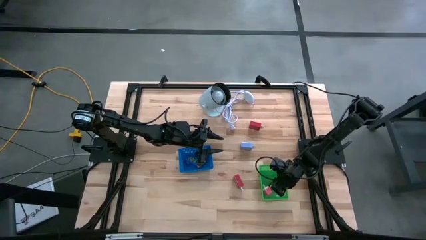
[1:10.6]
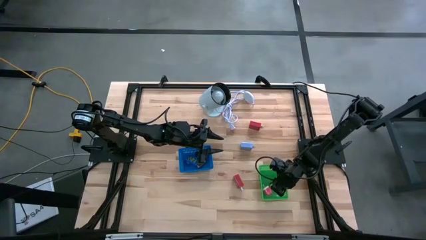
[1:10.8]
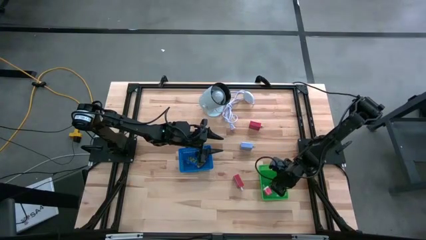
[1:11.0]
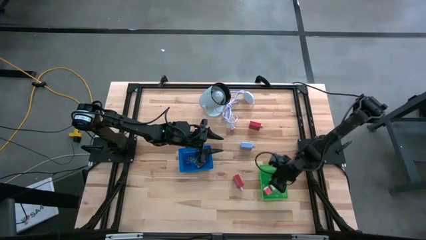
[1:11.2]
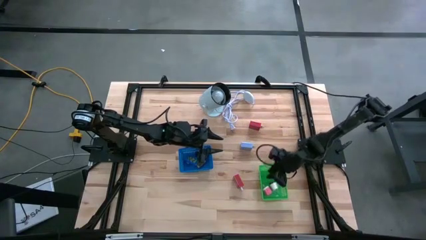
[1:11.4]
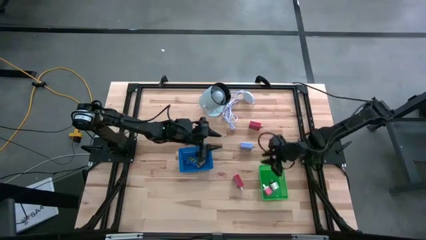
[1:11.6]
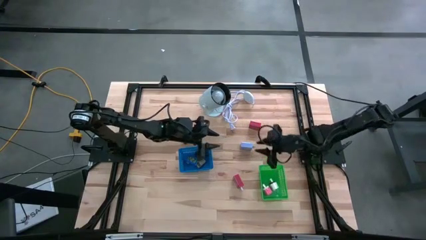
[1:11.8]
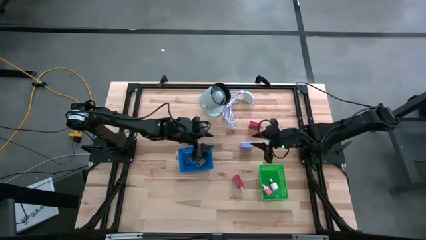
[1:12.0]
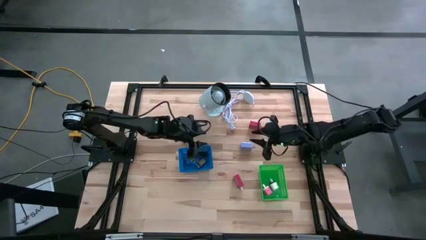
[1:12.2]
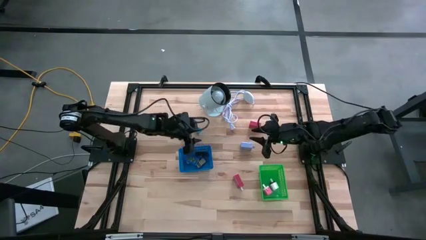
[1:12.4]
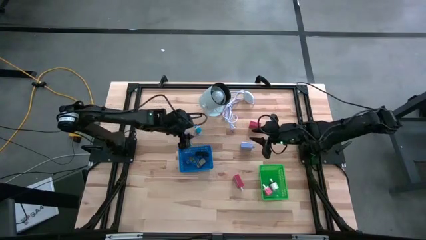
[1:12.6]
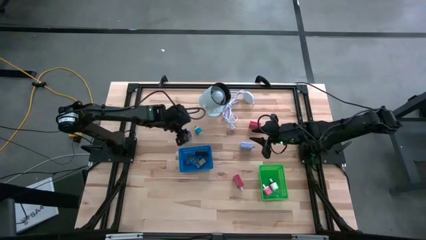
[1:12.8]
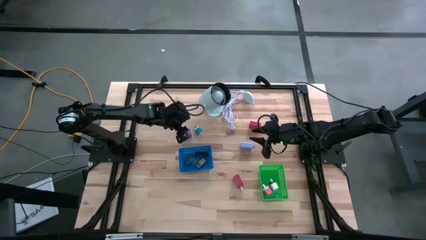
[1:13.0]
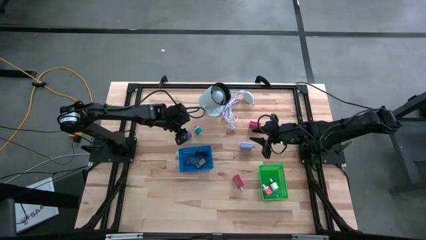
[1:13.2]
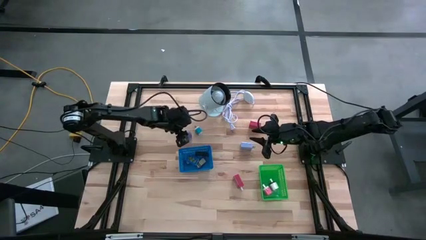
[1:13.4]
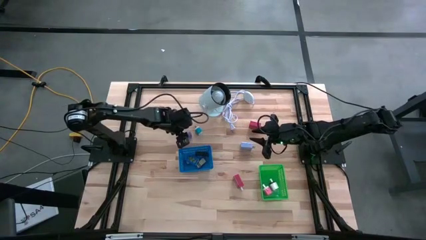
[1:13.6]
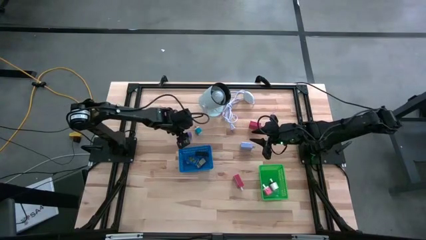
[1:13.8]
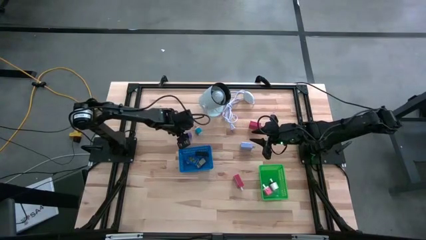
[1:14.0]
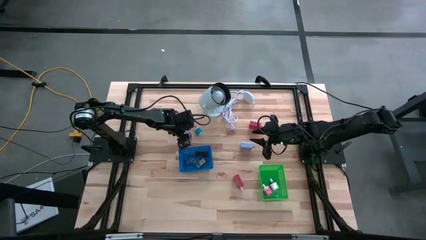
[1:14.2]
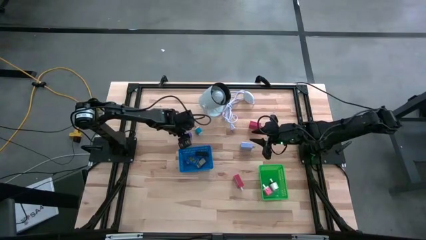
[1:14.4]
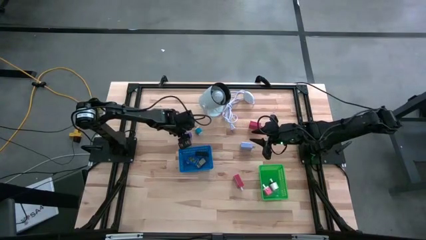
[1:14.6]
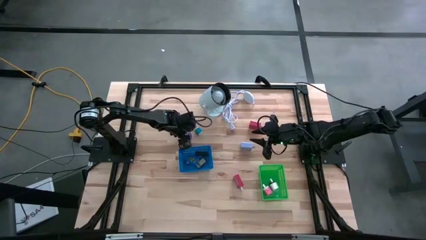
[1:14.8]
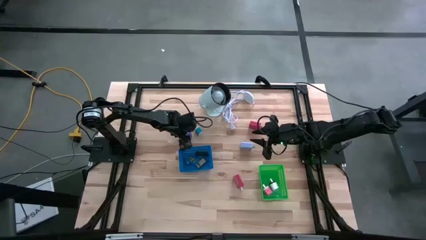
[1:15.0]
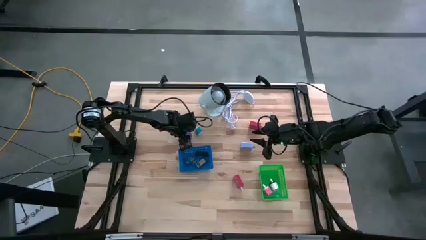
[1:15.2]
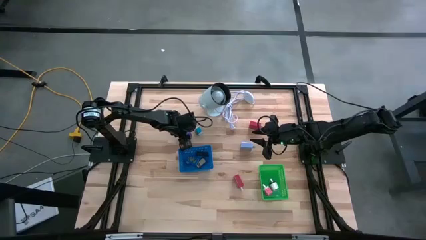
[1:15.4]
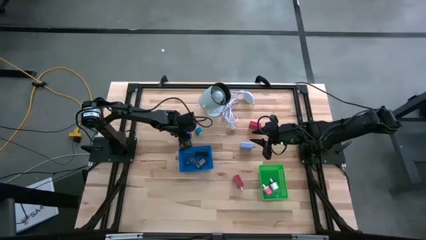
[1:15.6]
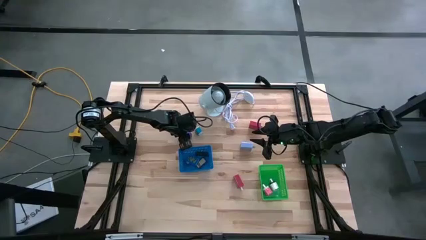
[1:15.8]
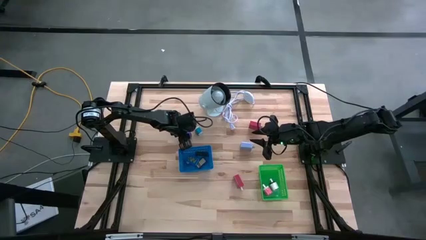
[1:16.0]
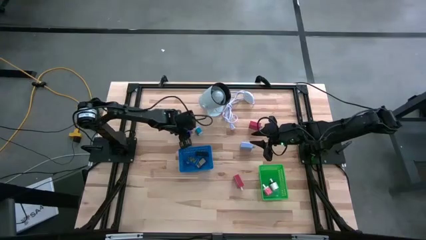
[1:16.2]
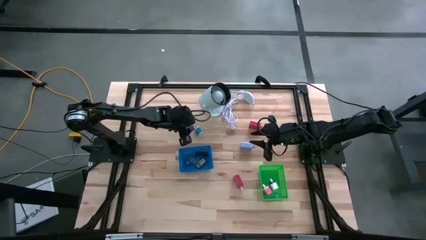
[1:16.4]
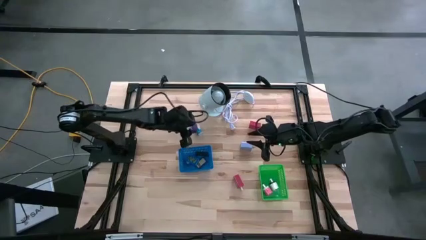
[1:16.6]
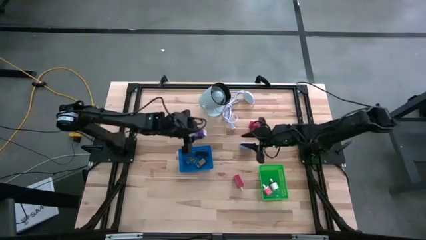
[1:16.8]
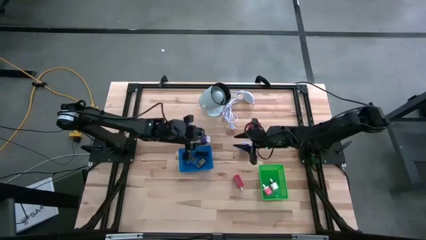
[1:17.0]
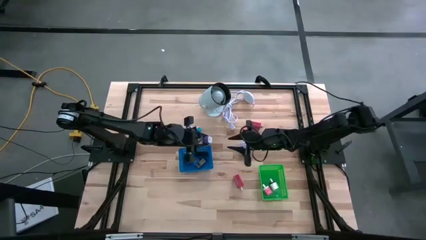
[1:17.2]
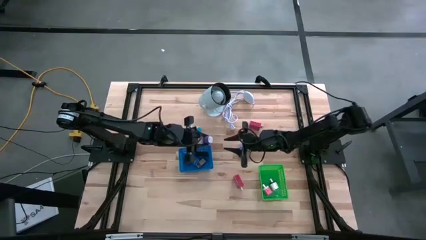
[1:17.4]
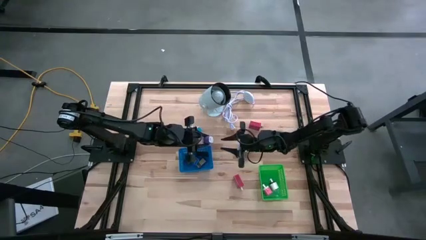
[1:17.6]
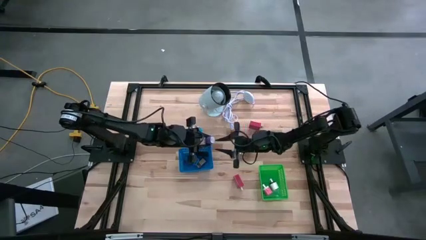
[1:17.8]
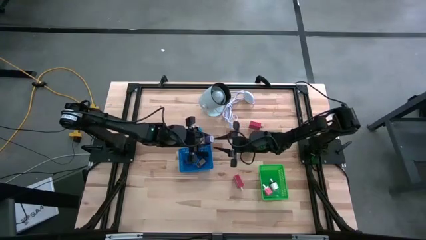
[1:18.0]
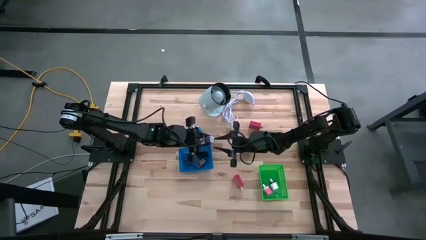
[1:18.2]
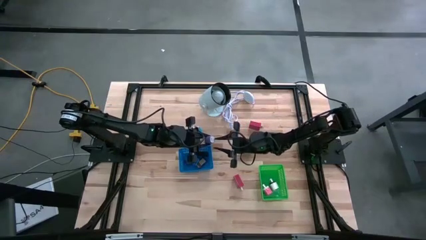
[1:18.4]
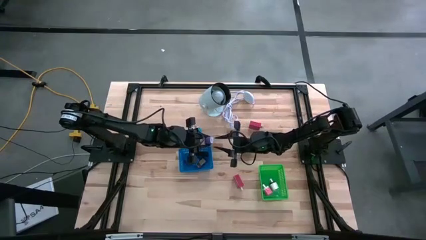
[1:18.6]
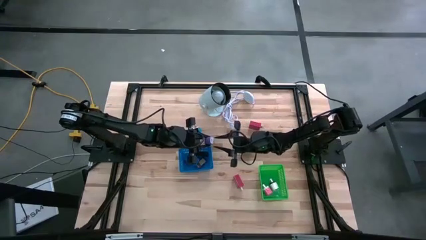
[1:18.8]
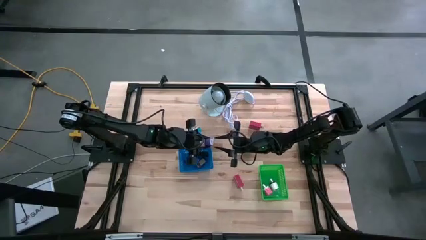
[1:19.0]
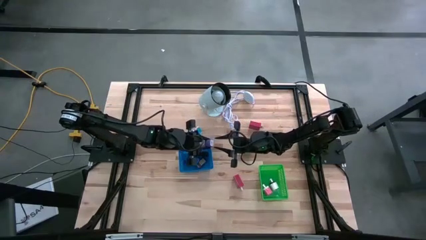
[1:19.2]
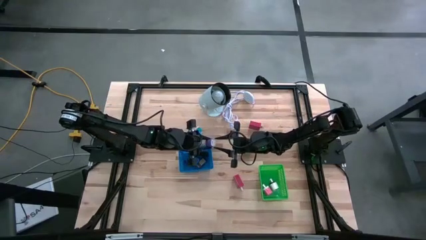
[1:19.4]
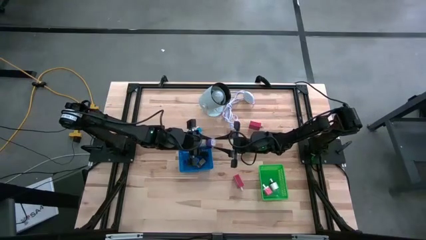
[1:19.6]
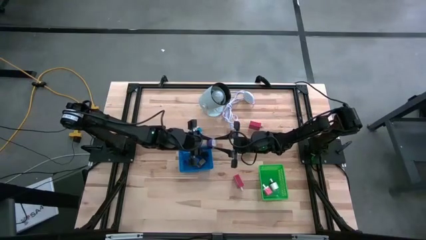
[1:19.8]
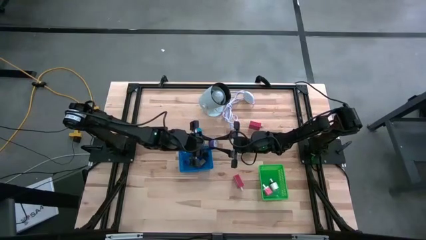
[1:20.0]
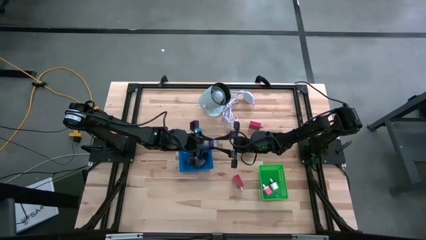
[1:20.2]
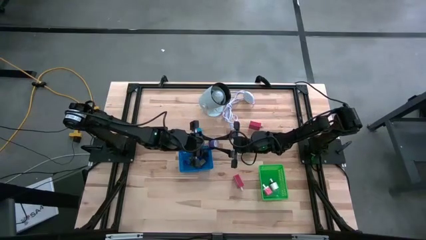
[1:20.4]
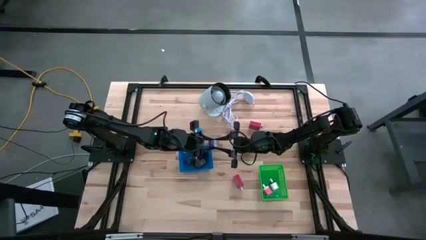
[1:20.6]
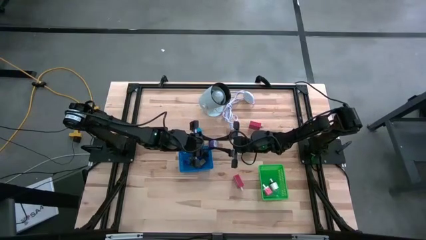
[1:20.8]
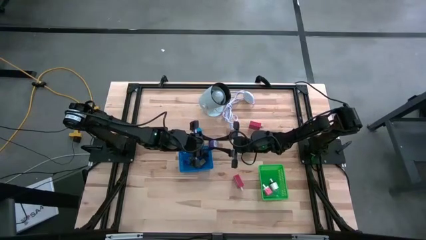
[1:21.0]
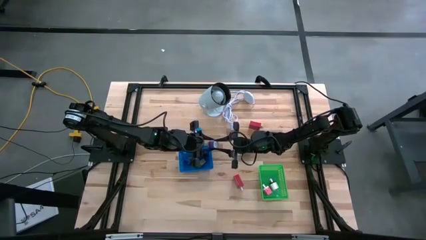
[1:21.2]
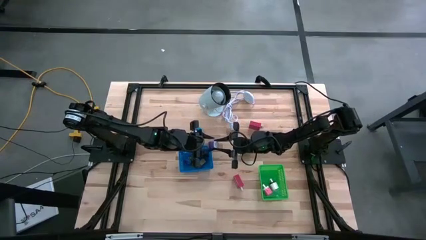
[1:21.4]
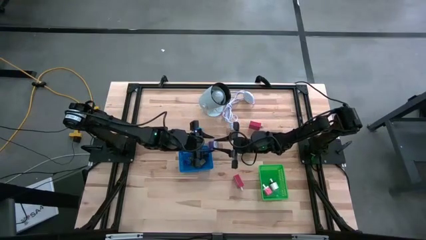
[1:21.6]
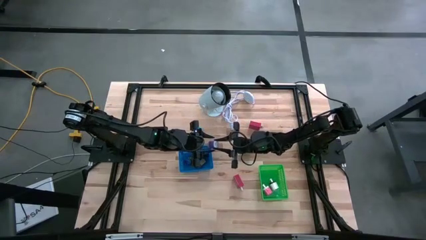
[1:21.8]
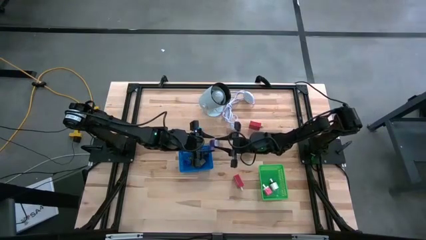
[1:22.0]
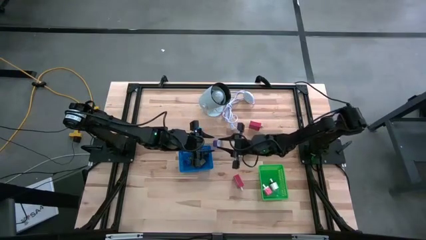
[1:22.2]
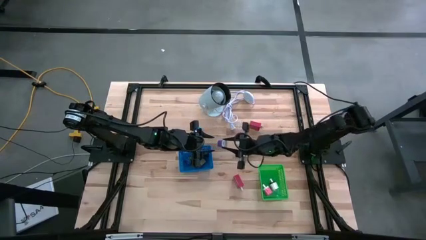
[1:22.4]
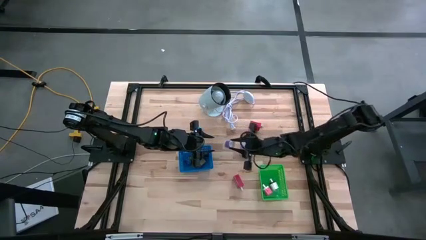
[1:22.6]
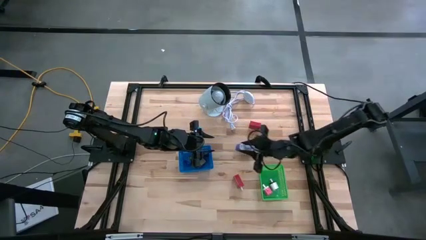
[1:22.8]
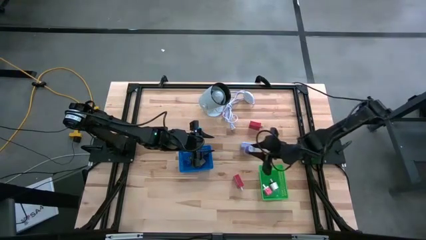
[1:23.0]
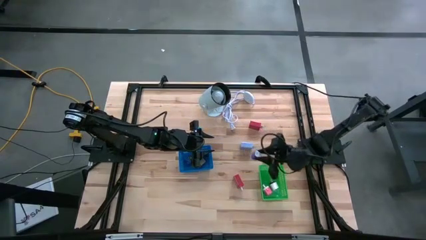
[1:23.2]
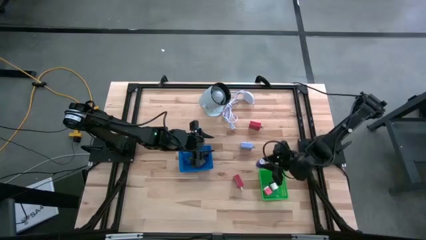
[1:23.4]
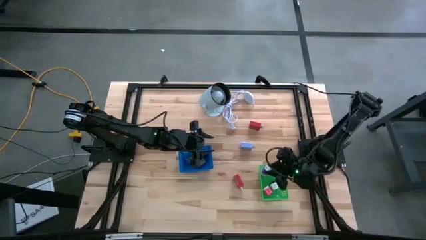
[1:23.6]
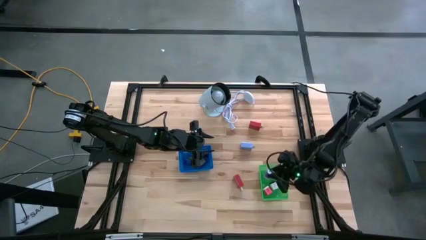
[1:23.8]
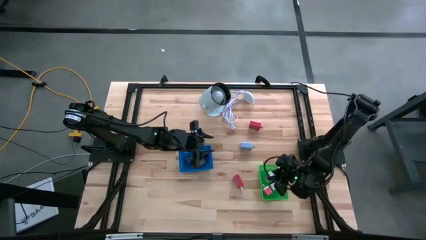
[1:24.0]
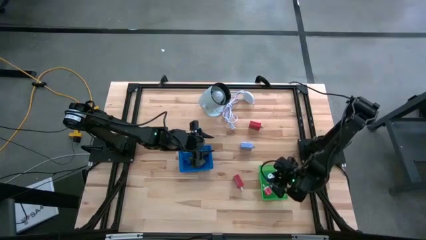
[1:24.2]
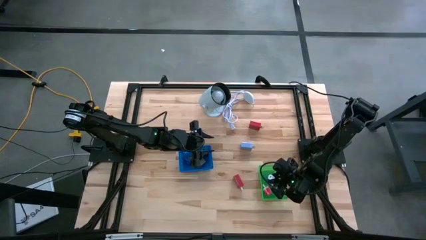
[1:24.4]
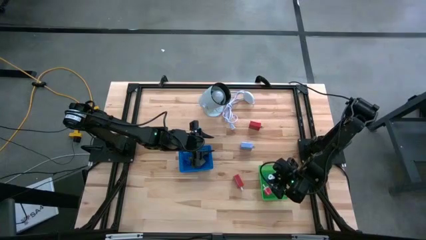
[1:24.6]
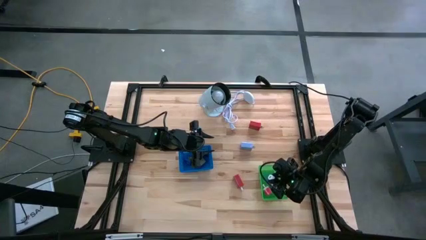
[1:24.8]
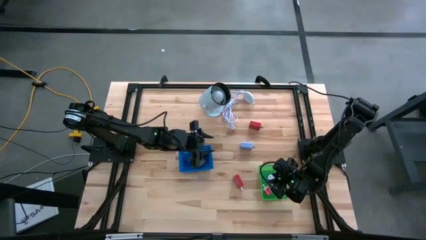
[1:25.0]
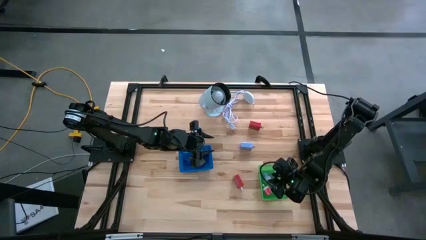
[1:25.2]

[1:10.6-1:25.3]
Task: Pick & Place Office items
Put the violet charger adapter into the green bin

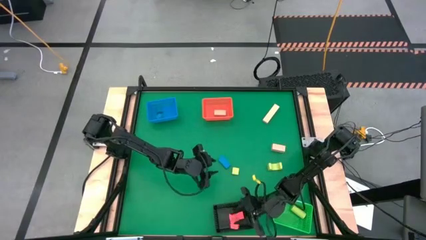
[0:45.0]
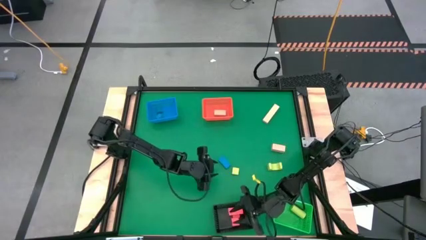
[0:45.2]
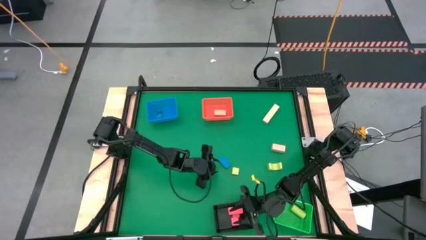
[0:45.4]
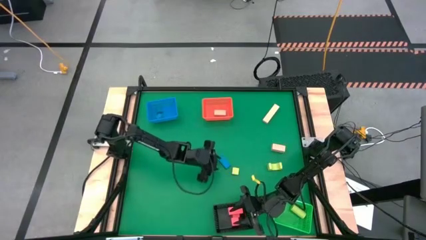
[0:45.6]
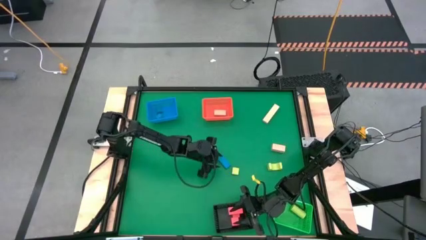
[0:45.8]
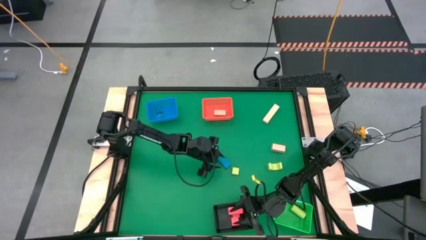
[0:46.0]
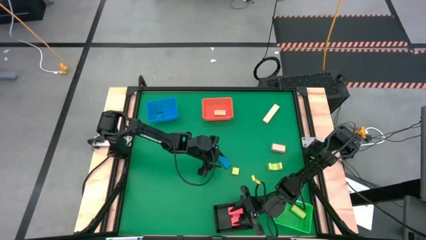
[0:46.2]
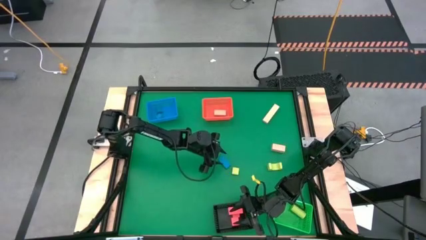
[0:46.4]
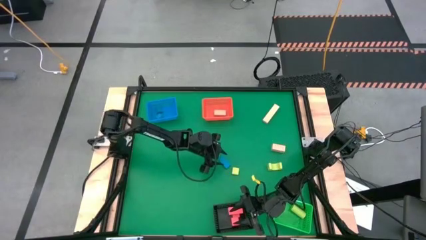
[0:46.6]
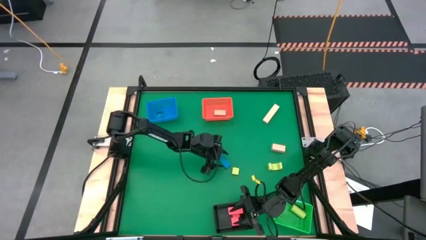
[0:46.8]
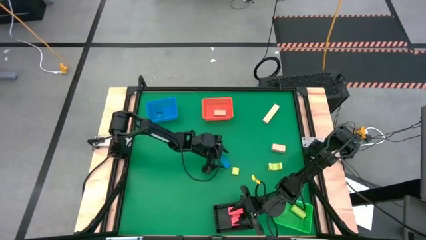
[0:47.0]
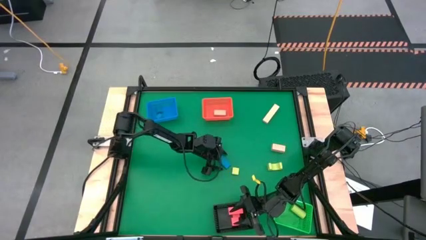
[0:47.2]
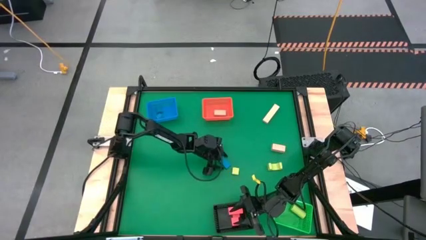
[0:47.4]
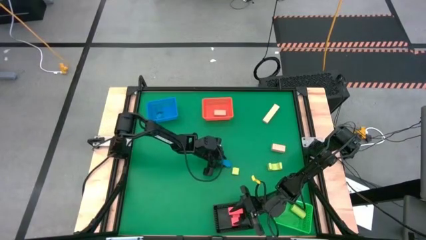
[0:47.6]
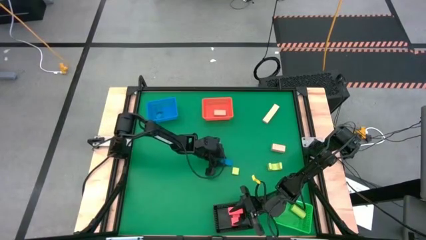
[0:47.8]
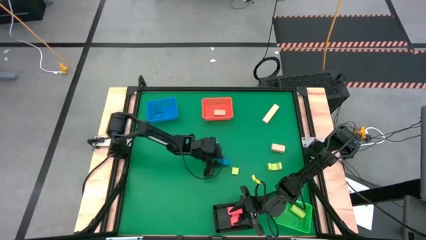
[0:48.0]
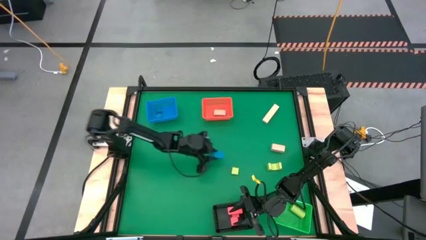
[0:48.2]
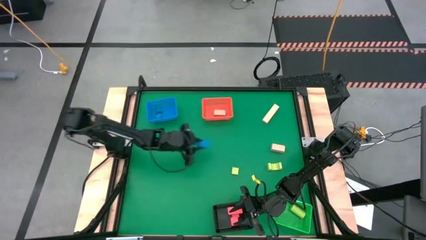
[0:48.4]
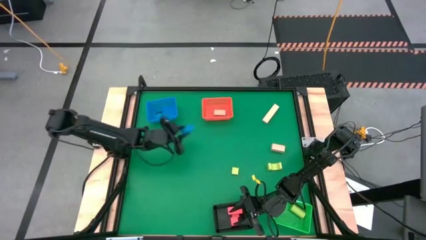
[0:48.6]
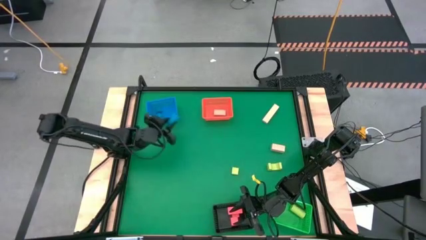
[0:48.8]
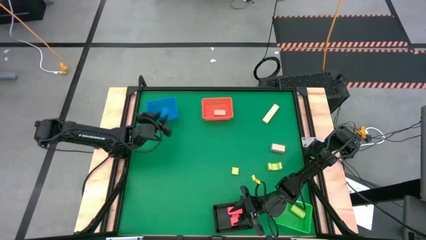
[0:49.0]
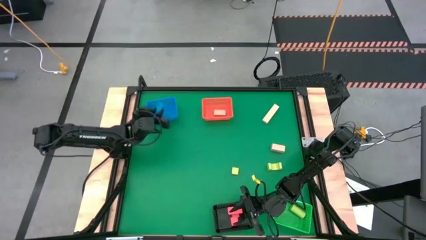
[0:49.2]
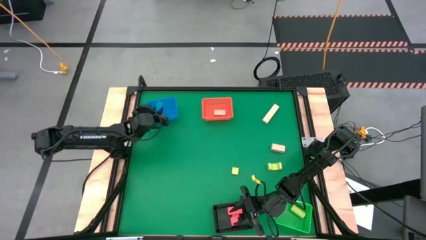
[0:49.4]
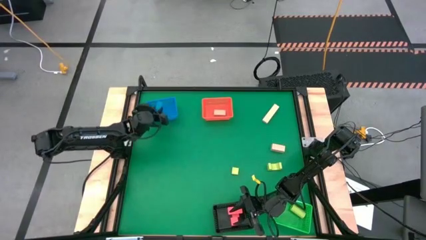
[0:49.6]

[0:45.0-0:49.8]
Task: Sort & place blocks by color
Put the blue block into the blue bin
